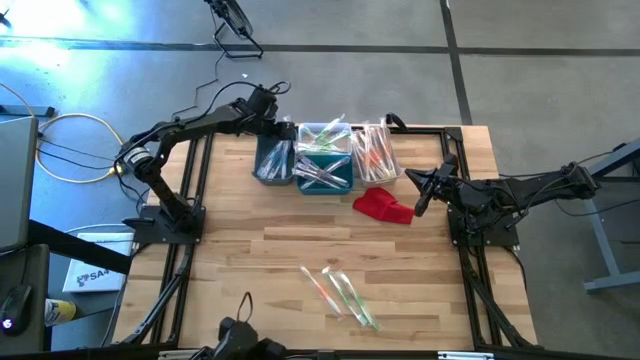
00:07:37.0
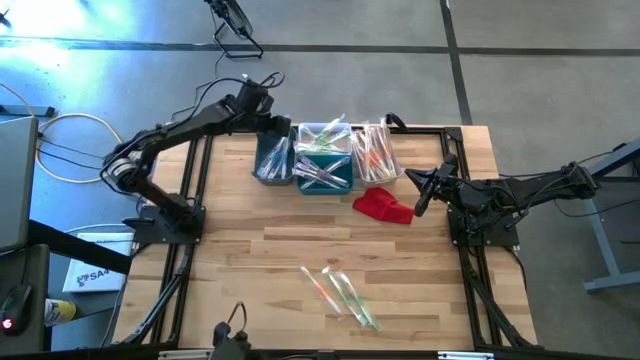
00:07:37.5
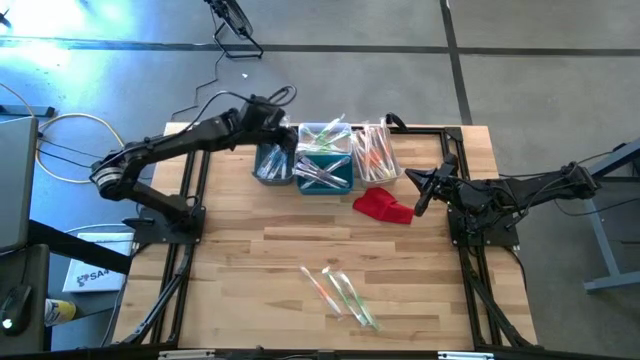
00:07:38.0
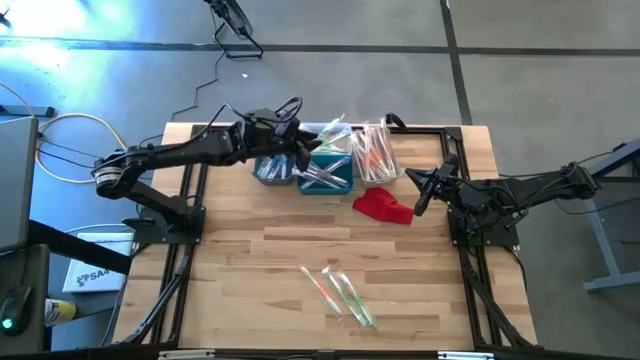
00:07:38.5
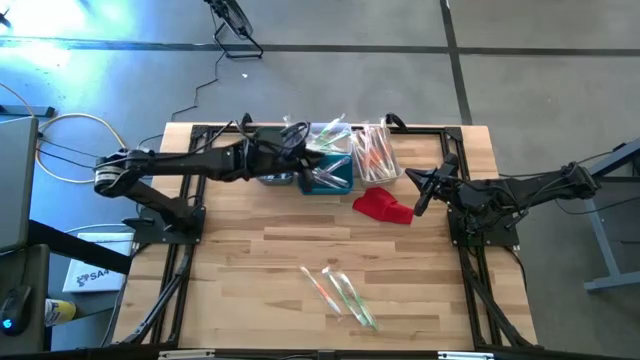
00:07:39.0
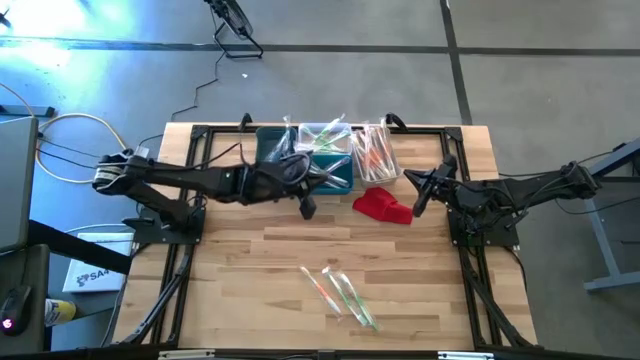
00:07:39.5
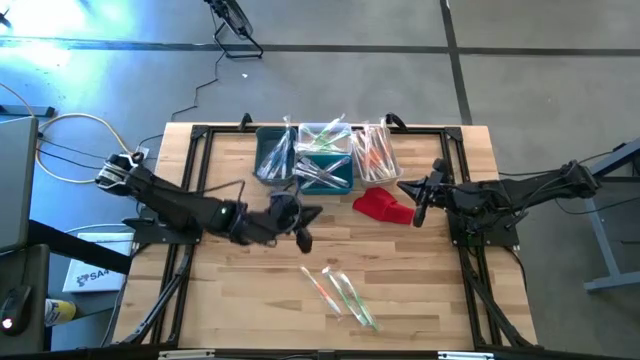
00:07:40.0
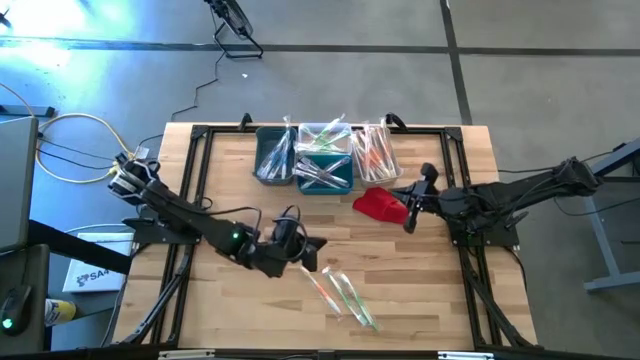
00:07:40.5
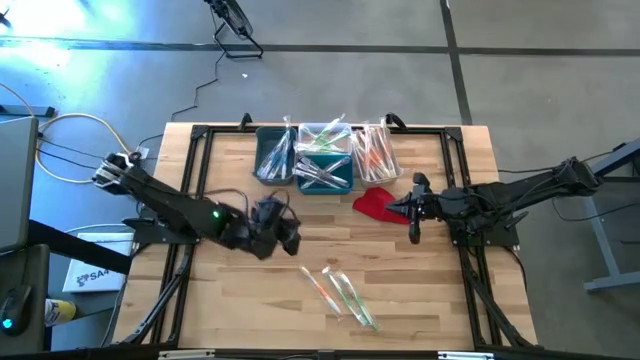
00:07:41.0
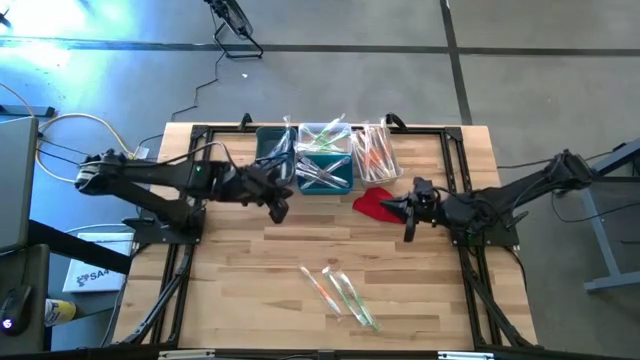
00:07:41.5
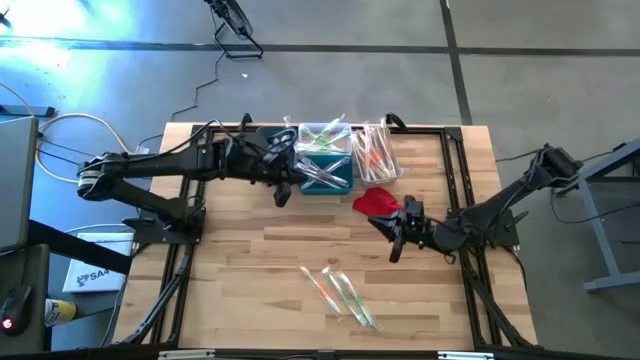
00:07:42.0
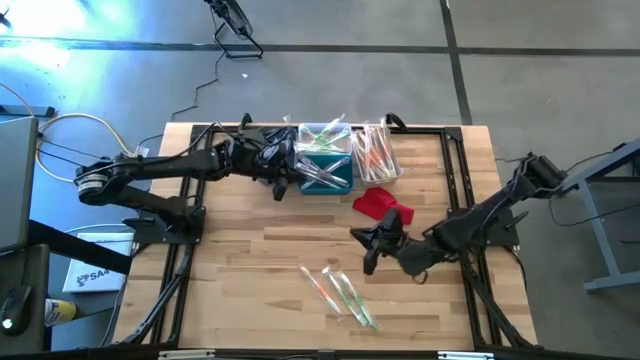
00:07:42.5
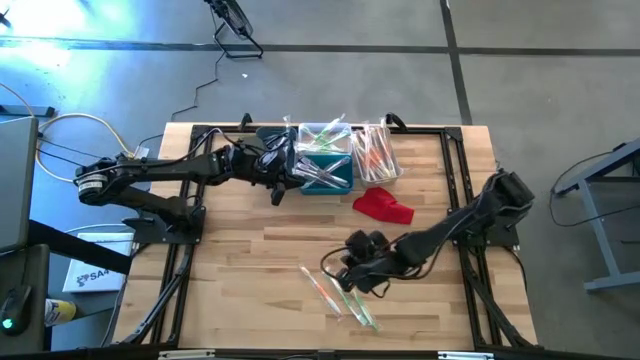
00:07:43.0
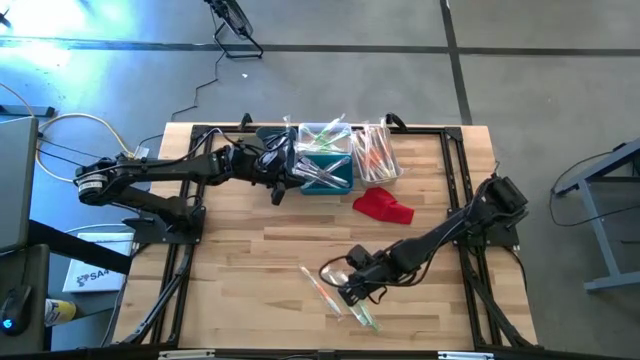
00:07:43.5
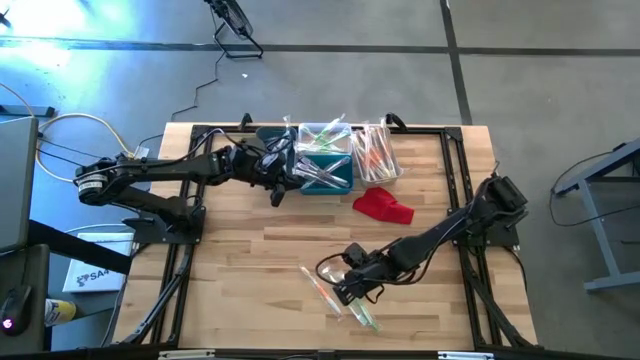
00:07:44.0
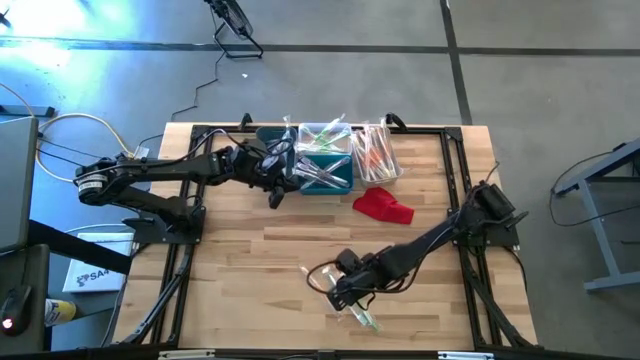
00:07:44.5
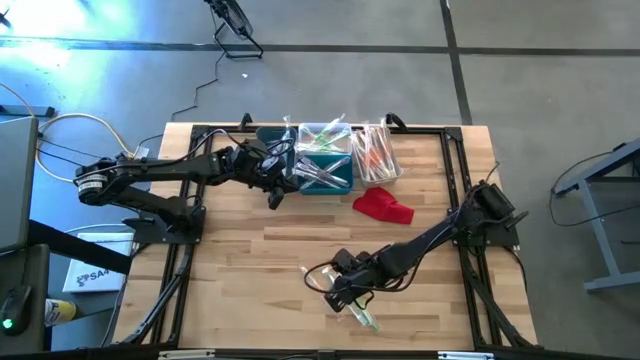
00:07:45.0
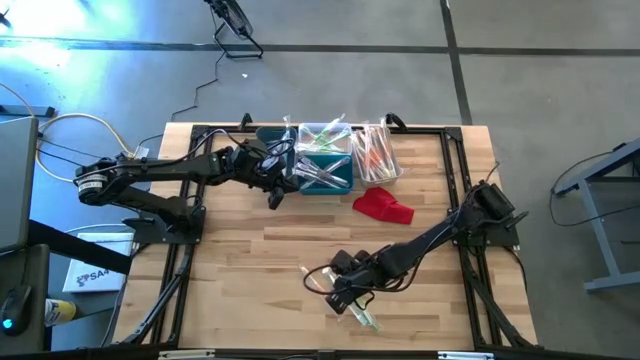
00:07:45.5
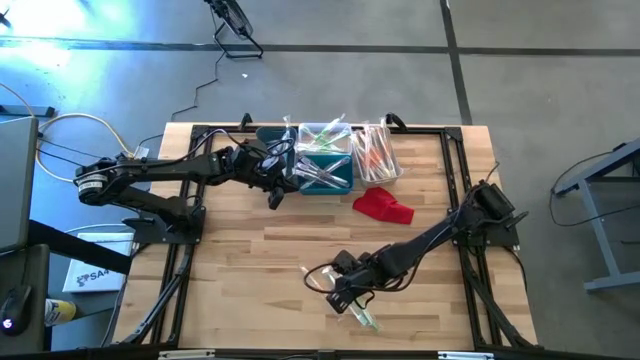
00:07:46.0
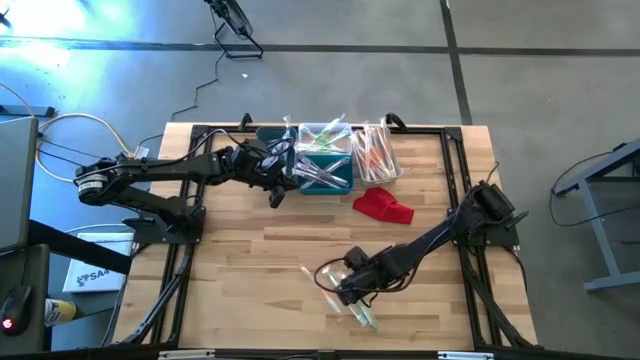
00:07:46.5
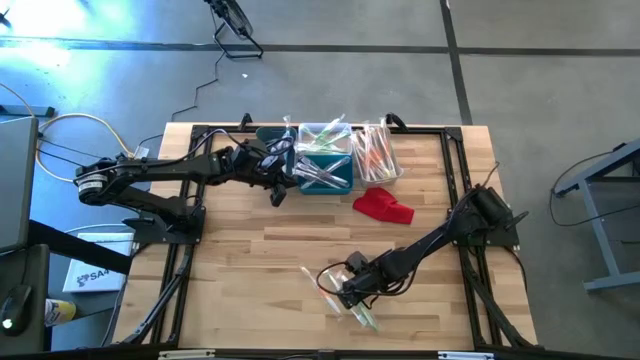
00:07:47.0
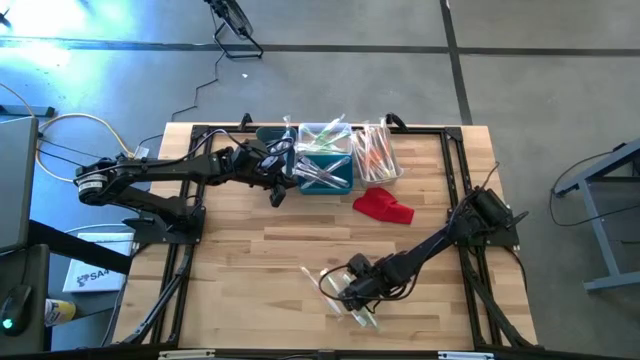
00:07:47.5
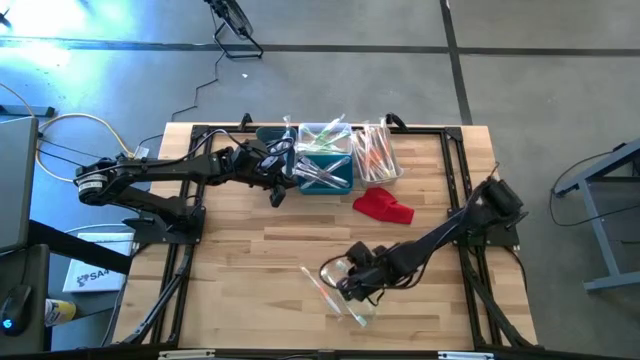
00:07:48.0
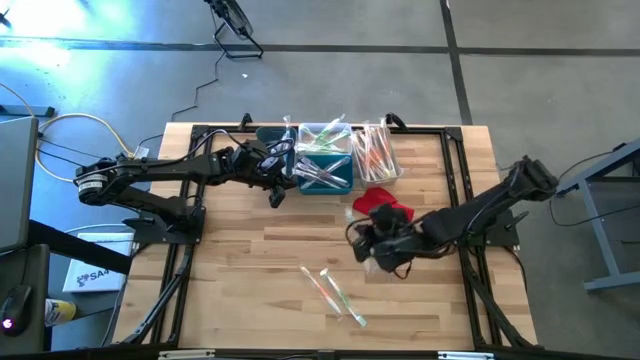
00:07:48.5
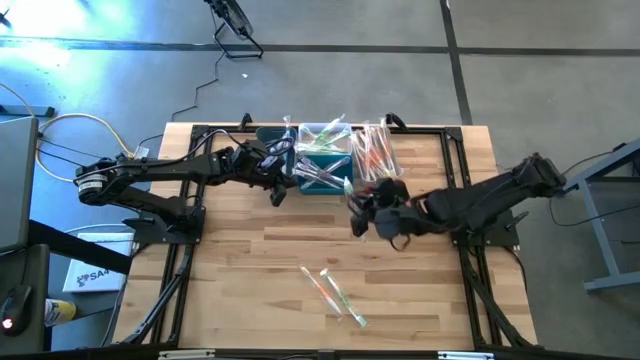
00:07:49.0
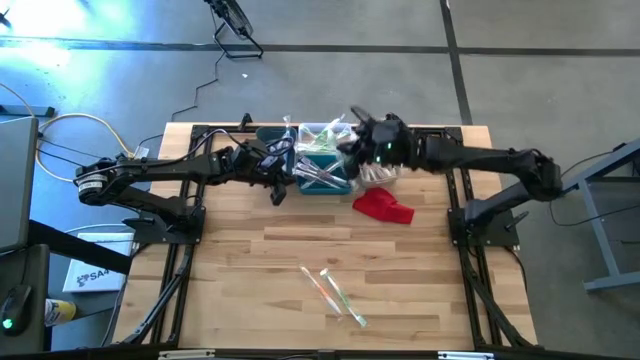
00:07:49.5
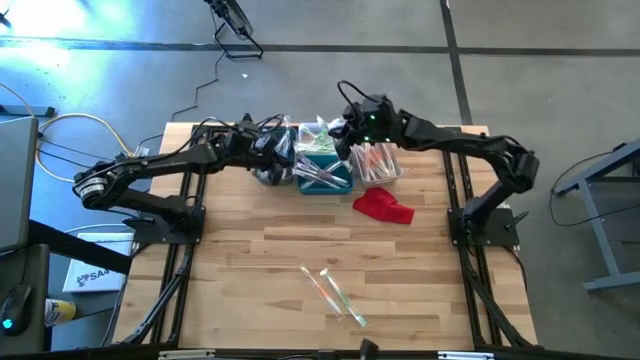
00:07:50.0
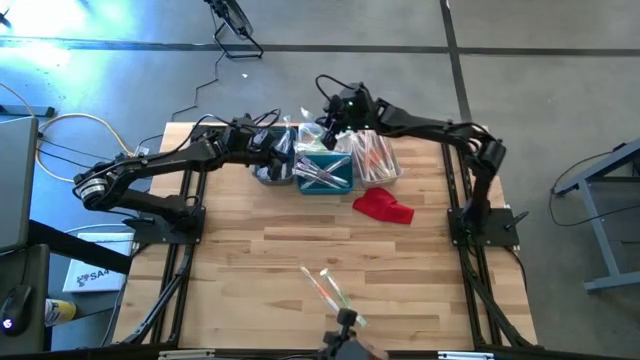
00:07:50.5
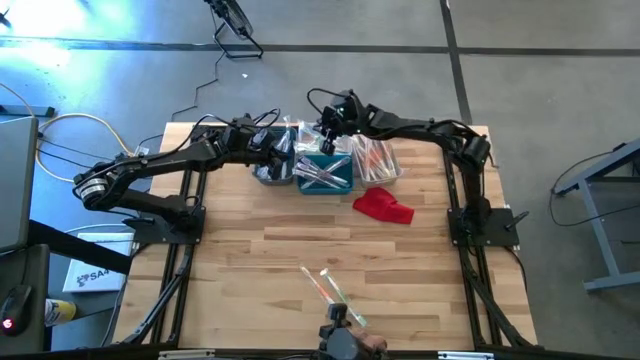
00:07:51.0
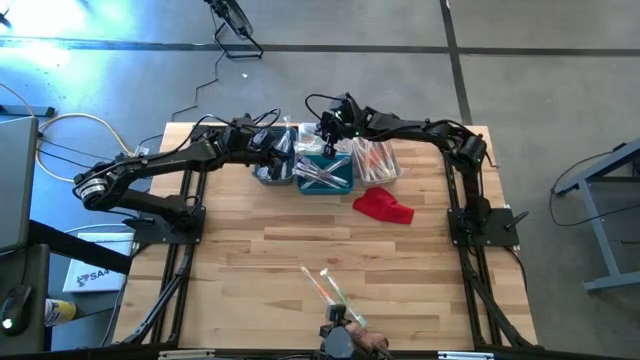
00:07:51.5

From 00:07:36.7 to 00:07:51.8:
Task: Pick & Place Toothbrushes
Put the right green toothbrush into the transparent bin

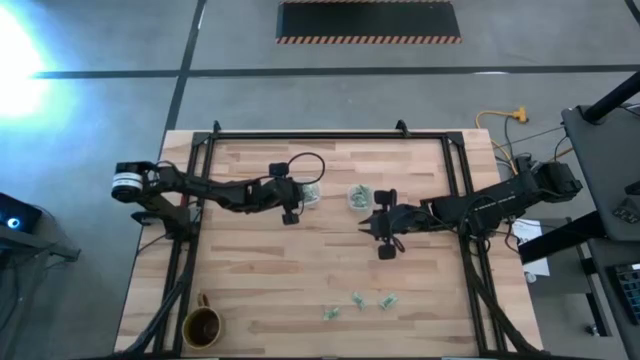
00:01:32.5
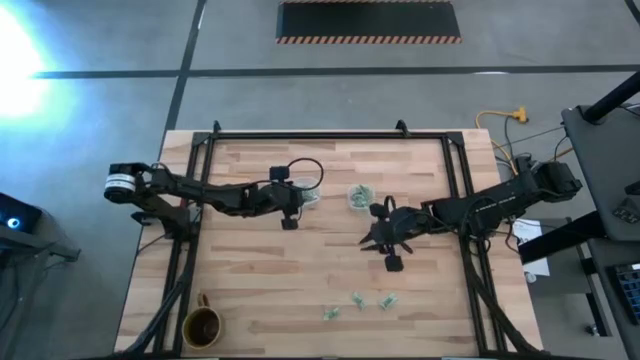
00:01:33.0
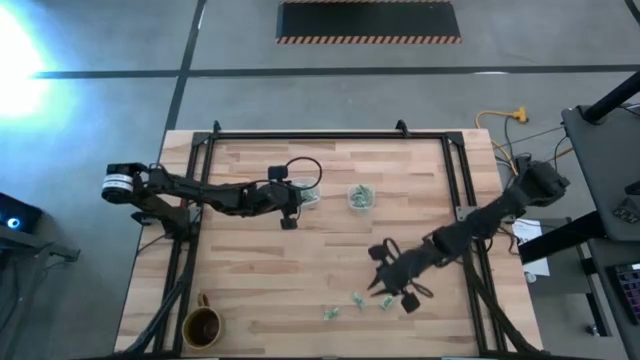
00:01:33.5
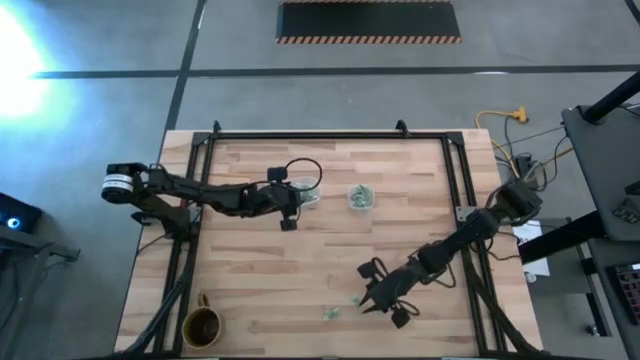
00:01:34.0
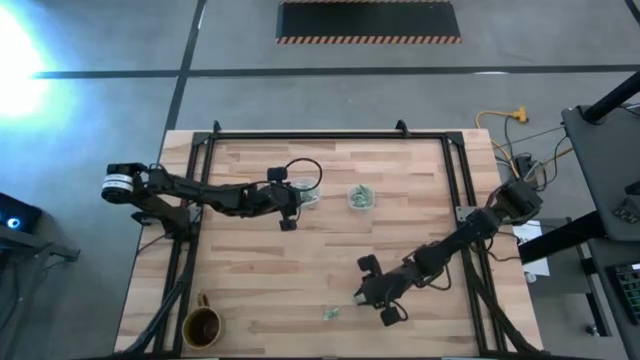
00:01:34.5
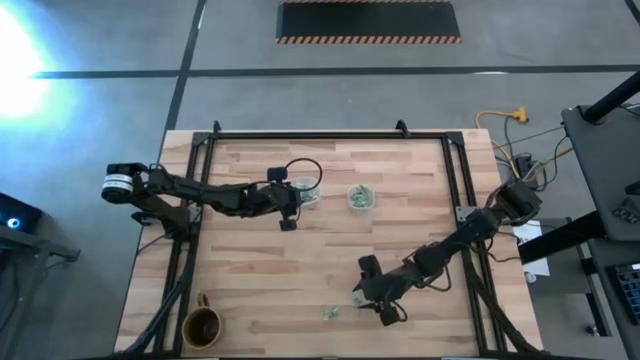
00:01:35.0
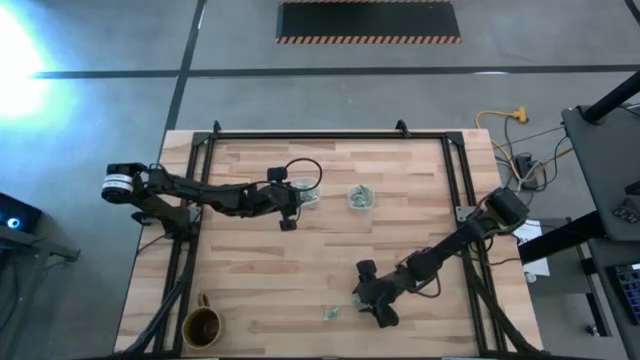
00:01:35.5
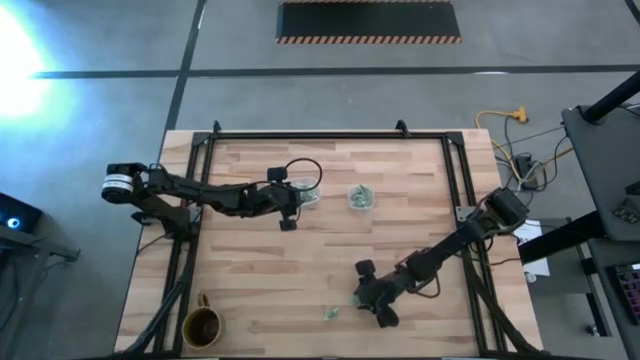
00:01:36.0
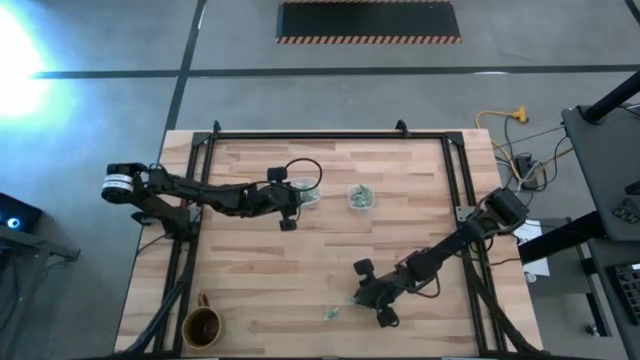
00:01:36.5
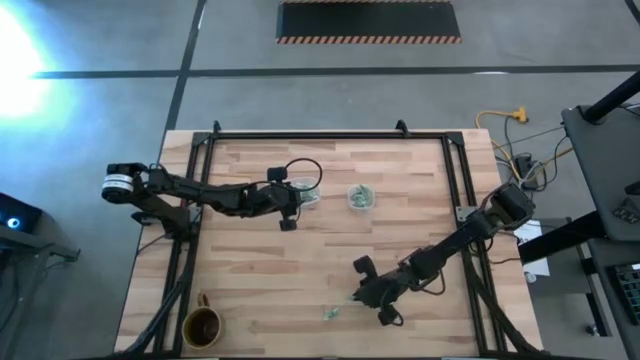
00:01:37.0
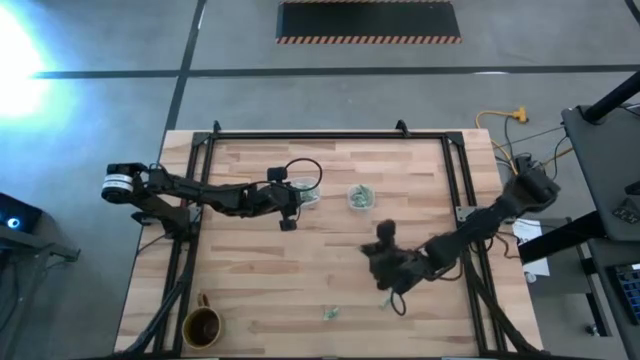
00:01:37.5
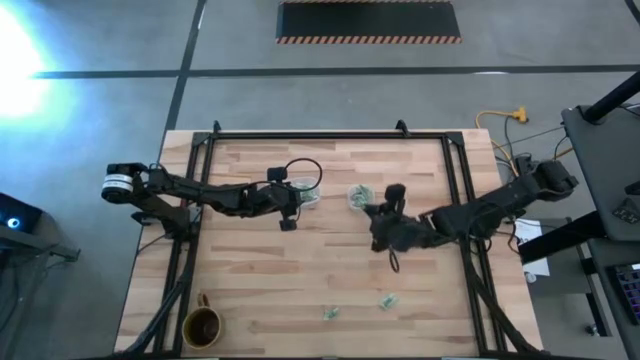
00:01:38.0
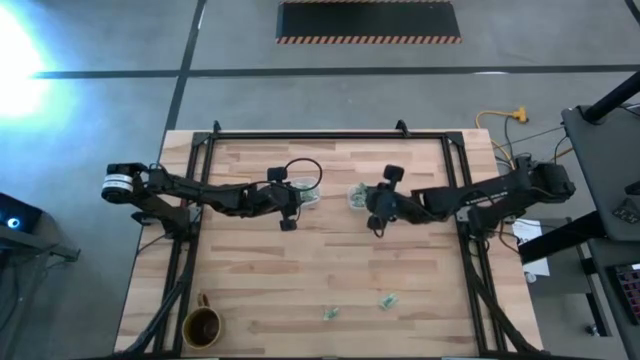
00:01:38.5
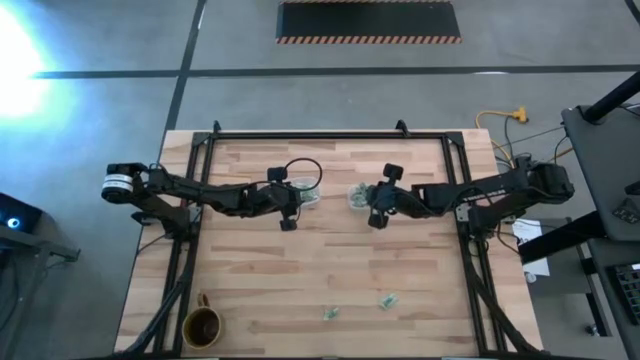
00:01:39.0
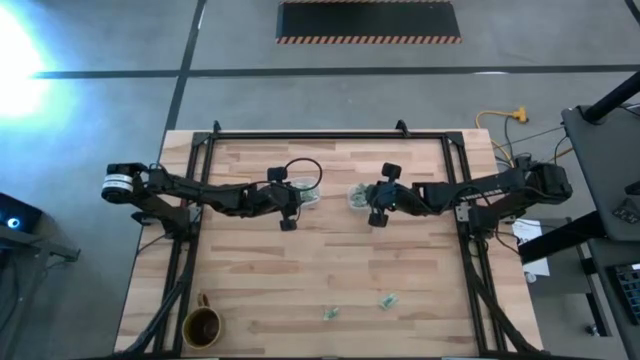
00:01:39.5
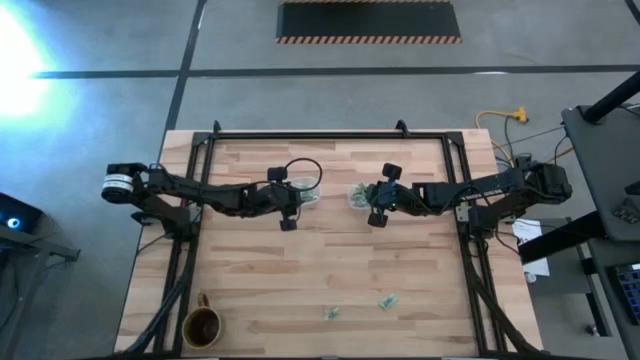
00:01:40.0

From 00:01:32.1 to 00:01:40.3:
Task: Pick and place Stevia / Truvia into bins
Put the middle stevia packet into the transparent square container
